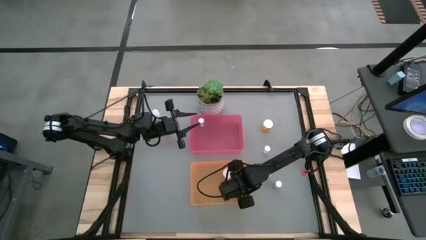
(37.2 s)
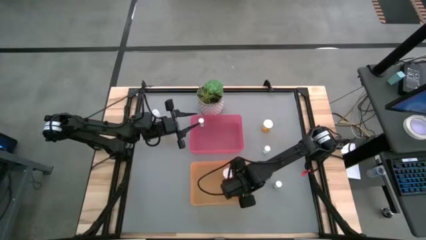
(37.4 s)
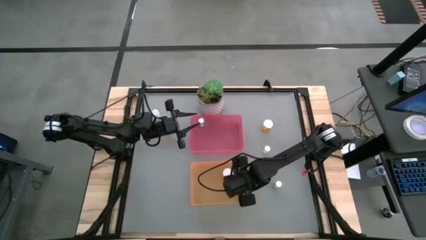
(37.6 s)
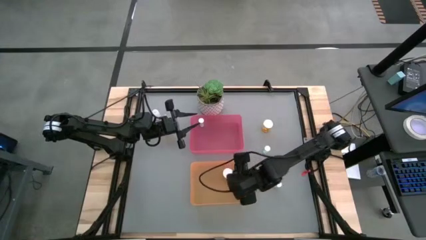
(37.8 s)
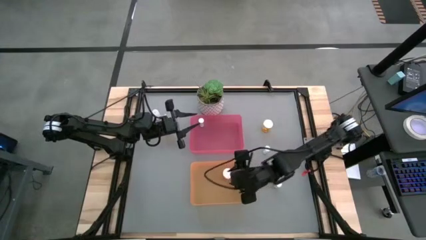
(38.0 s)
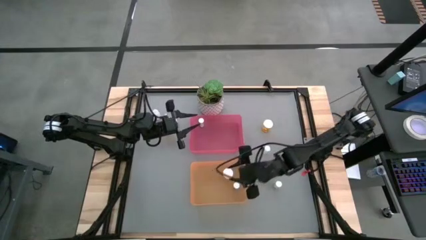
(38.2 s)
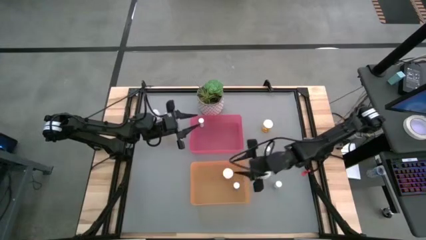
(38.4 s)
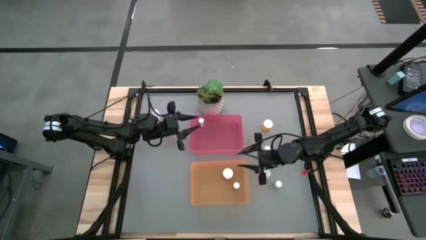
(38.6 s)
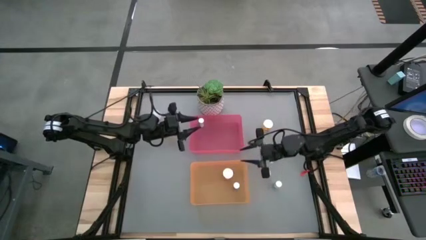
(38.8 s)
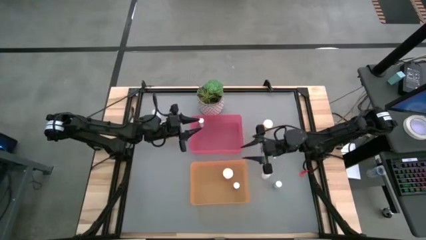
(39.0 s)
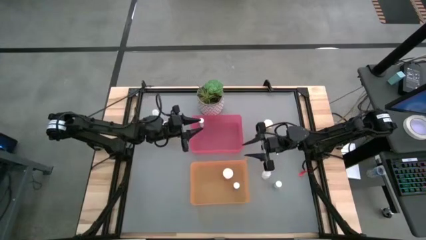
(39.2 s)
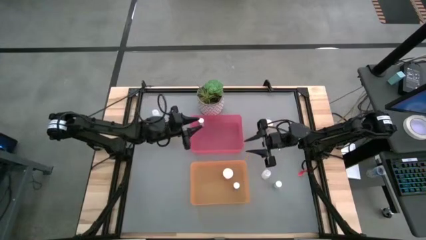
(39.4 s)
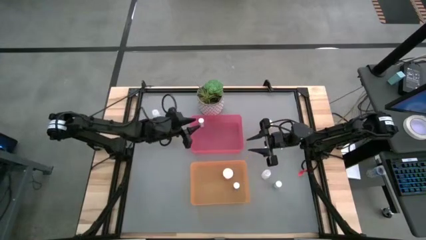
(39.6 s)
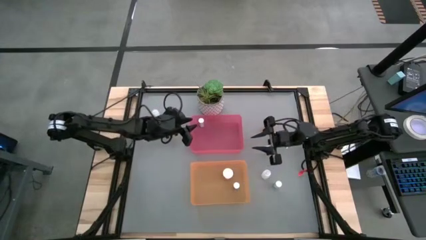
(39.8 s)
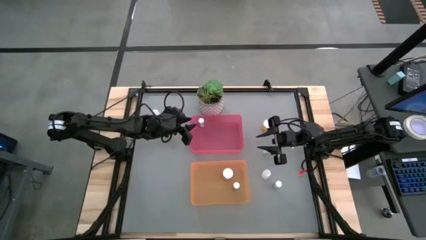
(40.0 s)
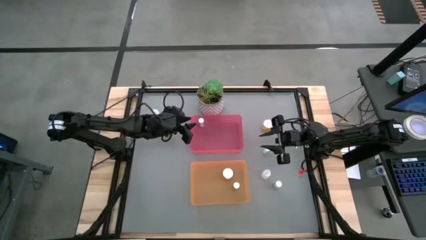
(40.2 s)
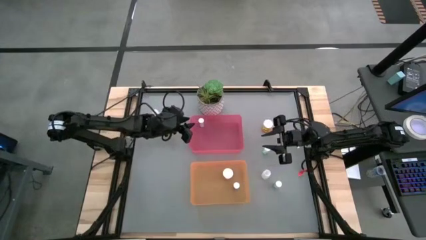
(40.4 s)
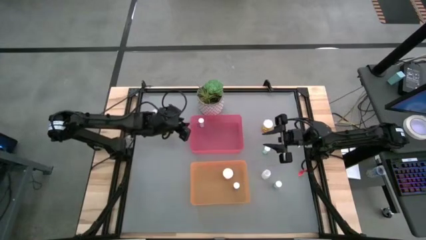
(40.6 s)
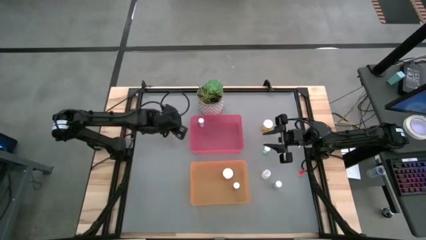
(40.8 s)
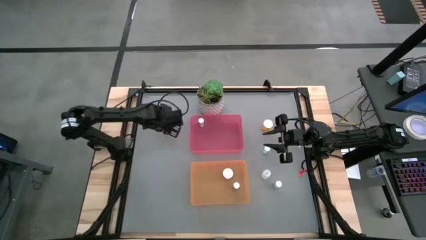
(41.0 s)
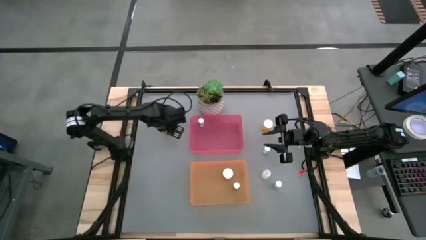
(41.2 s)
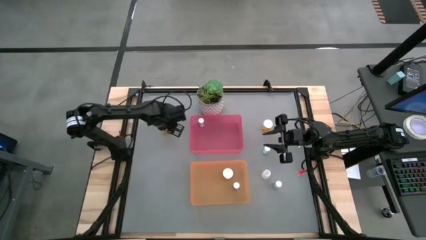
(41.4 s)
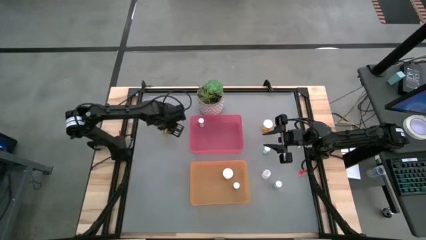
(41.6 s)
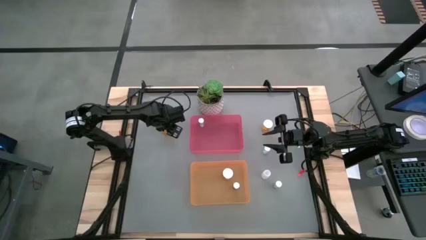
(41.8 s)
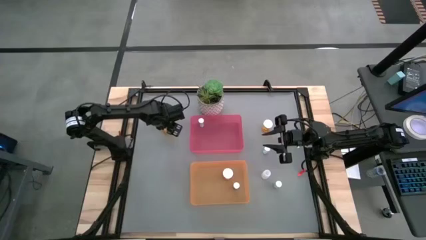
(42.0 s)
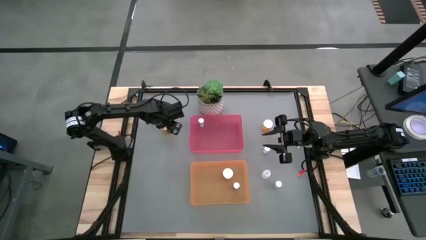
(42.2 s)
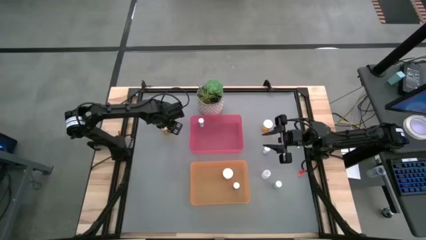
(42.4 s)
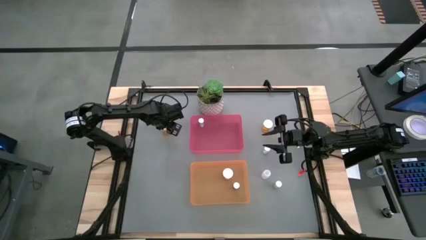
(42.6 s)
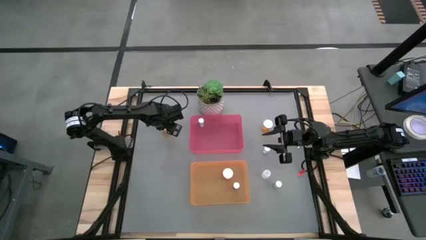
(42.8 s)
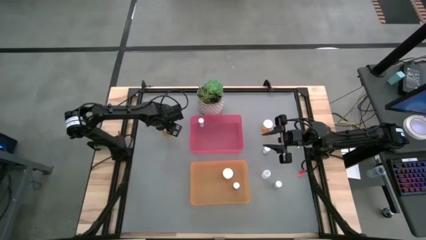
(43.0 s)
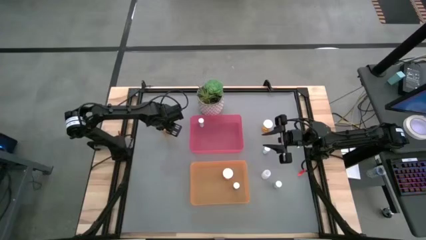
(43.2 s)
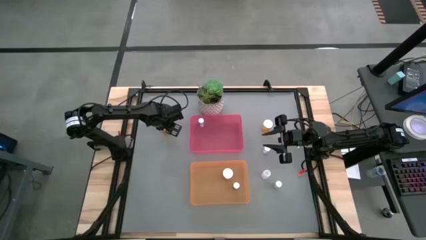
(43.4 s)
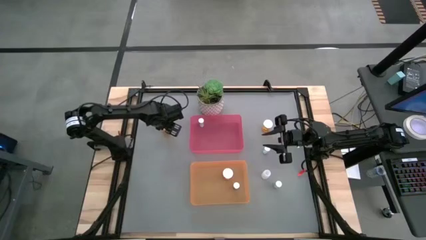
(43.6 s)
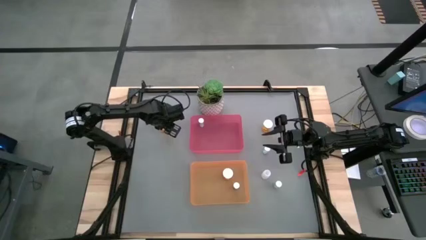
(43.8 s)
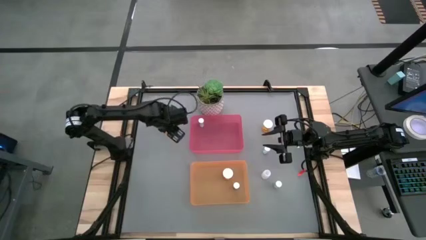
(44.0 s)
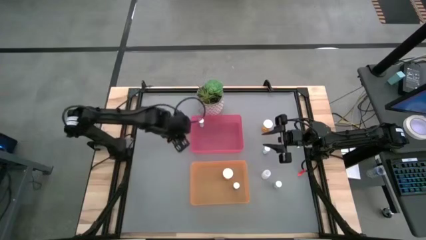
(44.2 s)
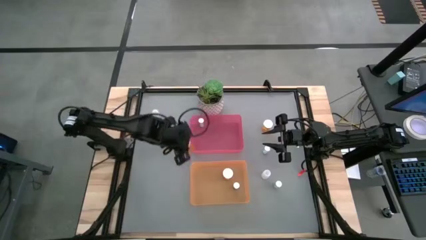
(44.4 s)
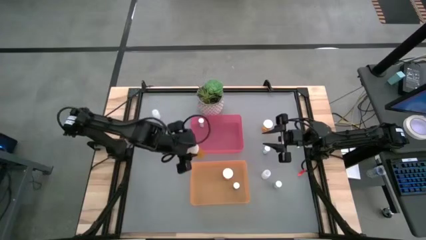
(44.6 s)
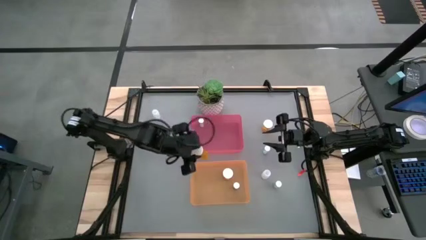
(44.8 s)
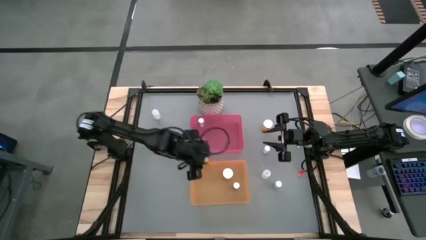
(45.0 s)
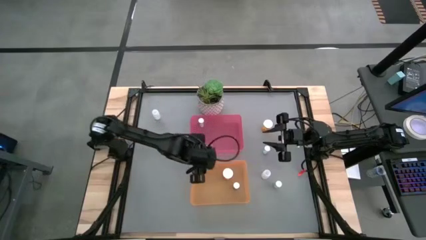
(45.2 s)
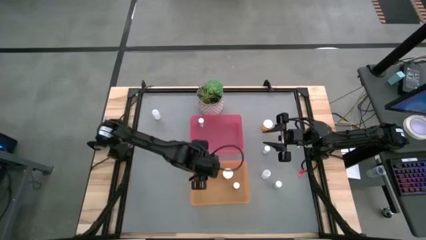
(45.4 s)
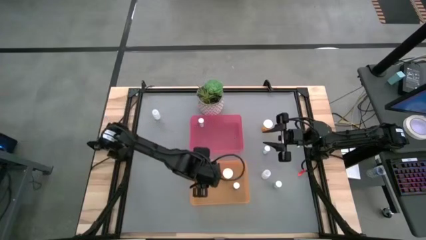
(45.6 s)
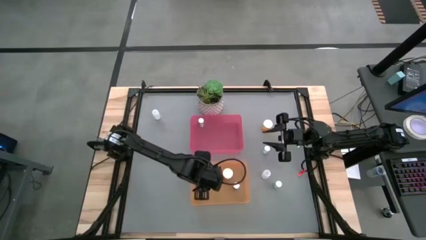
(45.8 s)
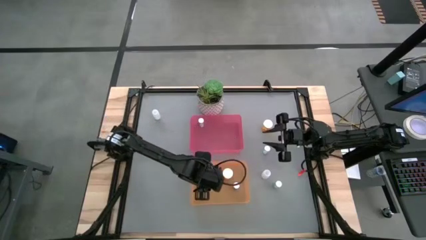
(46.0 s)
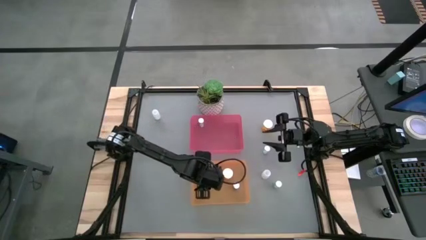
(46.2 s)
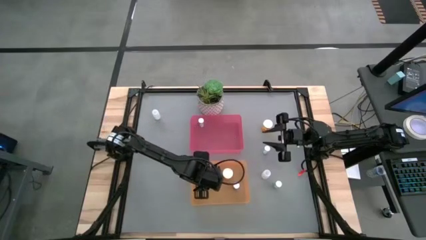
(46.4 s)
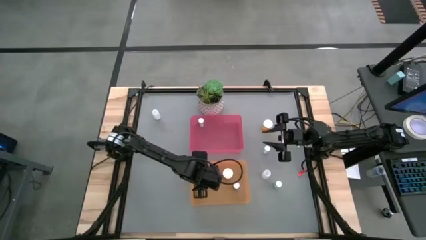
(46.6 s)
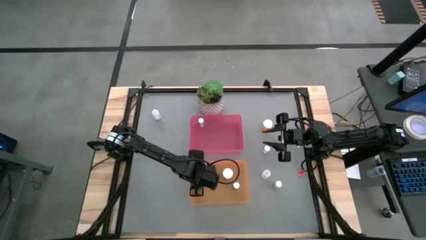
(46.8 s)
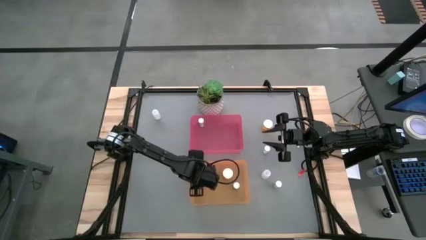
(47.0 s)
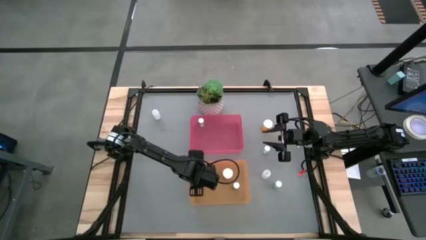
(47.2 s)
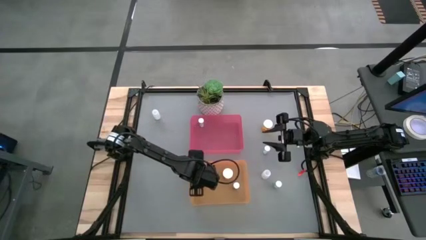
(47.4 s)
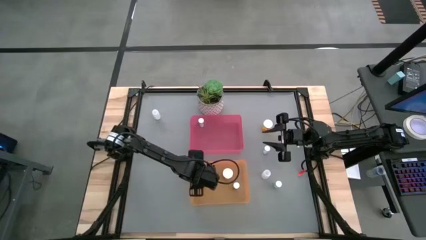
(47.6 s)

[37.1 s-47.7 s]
Task: Pick and place medicine bottles into bin by pill shape (circle, oval)
Put the left orange capsule bottle into the orange bin
